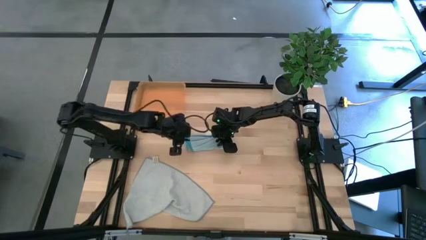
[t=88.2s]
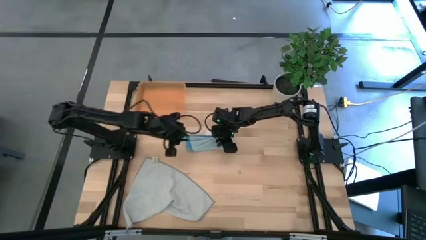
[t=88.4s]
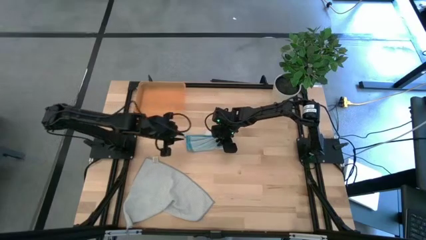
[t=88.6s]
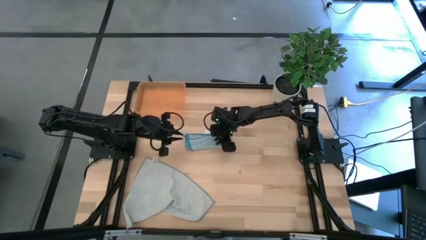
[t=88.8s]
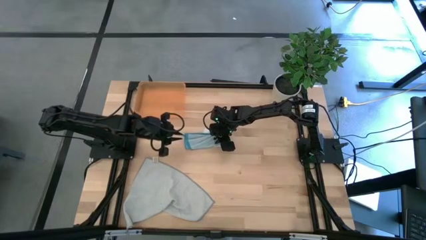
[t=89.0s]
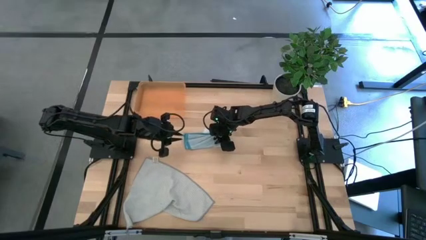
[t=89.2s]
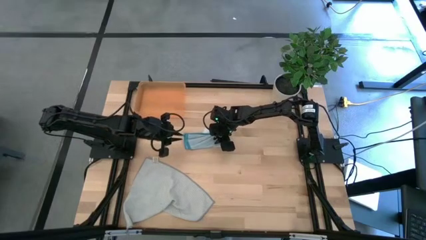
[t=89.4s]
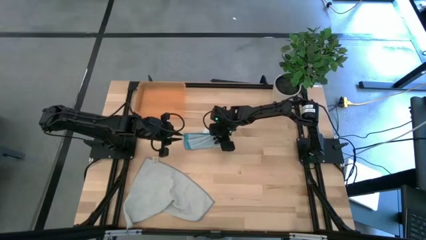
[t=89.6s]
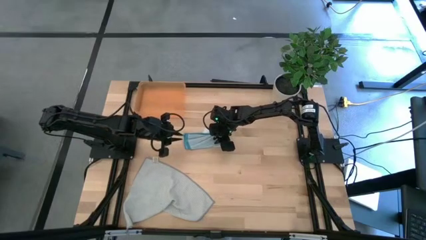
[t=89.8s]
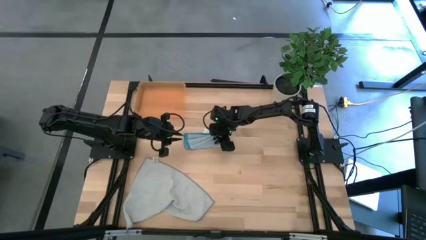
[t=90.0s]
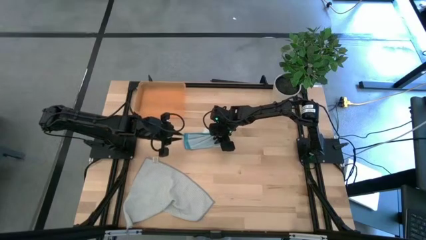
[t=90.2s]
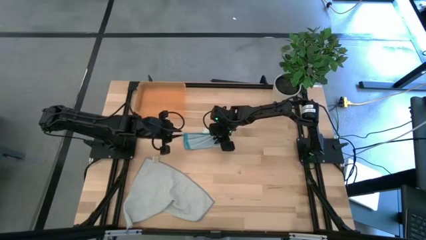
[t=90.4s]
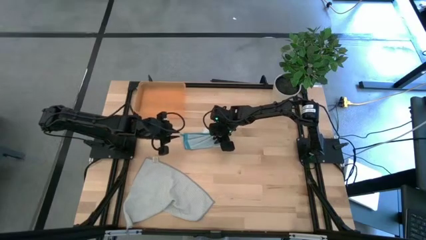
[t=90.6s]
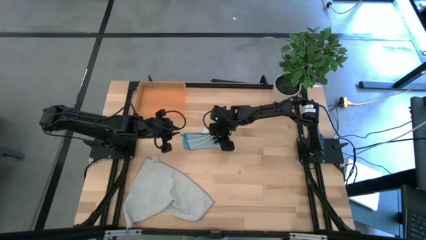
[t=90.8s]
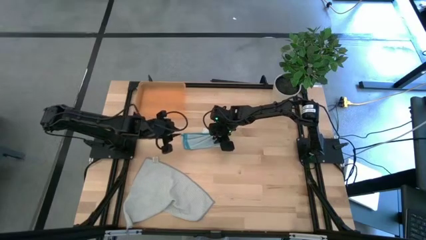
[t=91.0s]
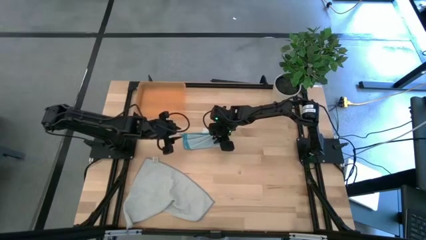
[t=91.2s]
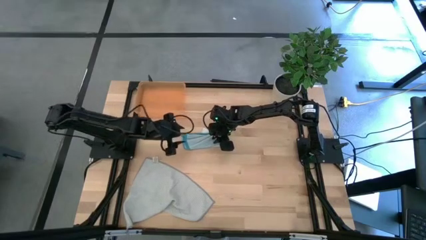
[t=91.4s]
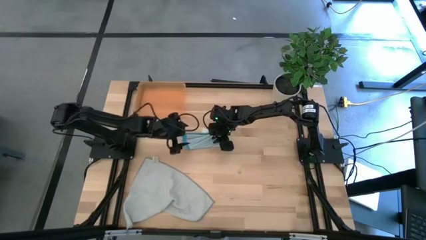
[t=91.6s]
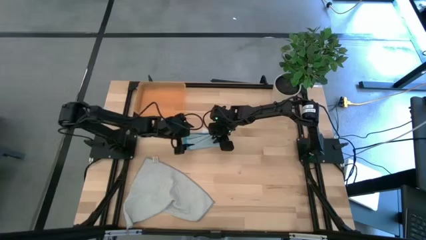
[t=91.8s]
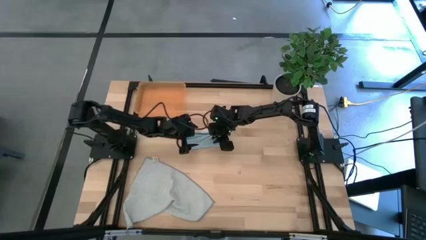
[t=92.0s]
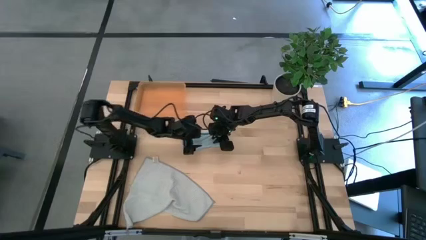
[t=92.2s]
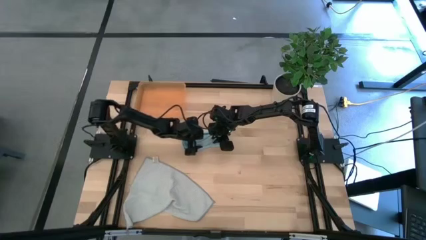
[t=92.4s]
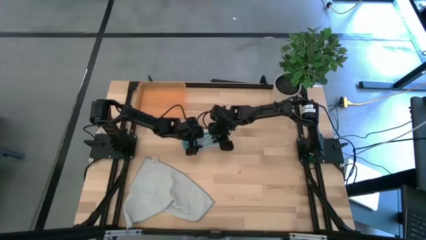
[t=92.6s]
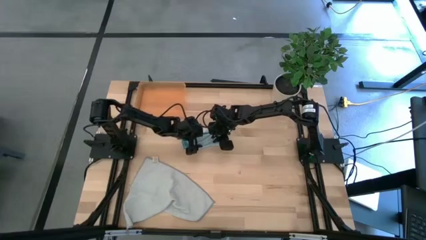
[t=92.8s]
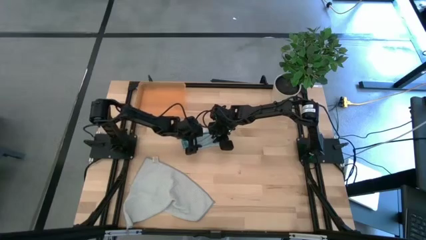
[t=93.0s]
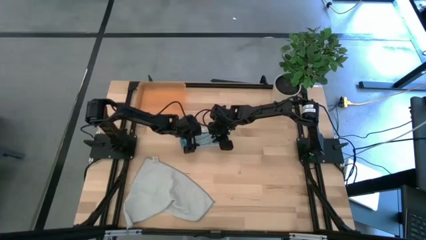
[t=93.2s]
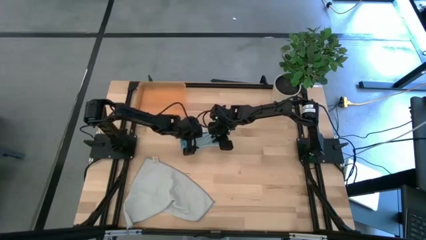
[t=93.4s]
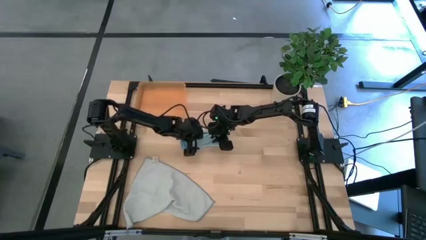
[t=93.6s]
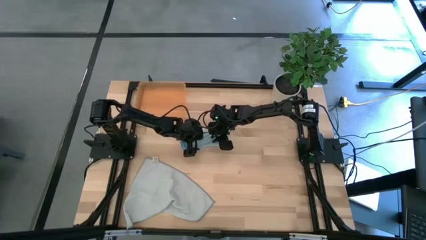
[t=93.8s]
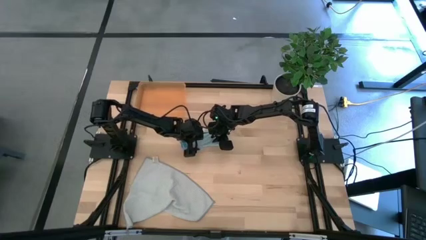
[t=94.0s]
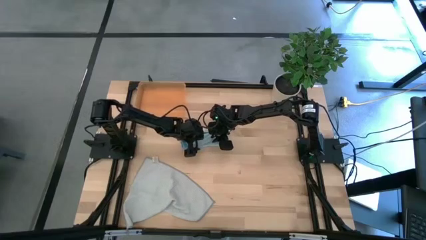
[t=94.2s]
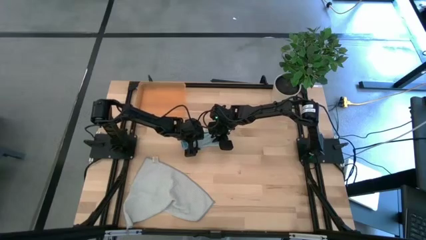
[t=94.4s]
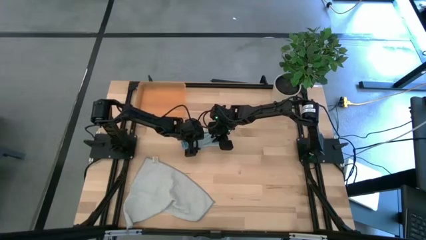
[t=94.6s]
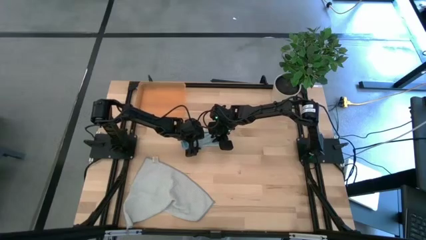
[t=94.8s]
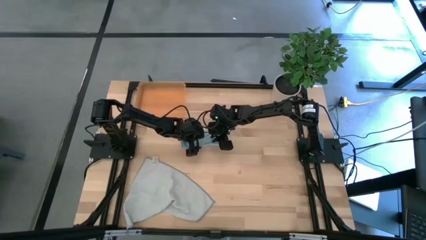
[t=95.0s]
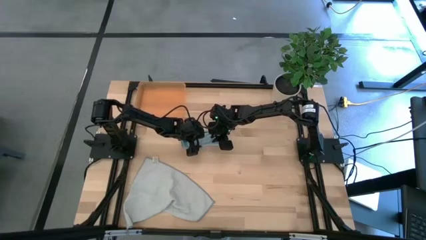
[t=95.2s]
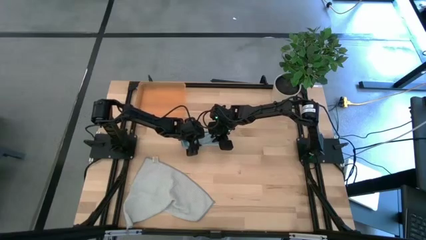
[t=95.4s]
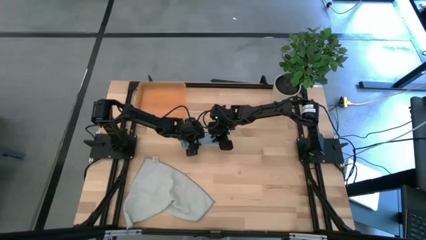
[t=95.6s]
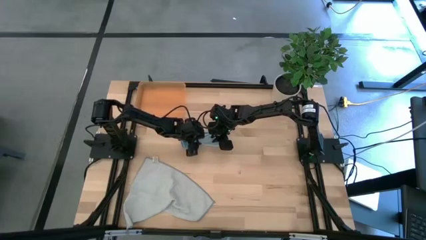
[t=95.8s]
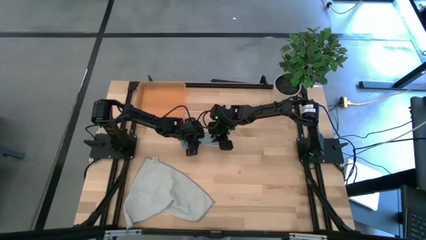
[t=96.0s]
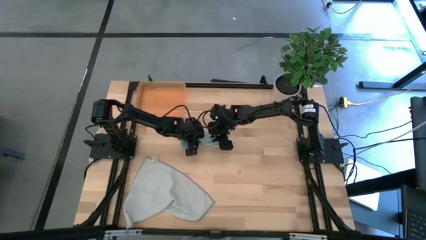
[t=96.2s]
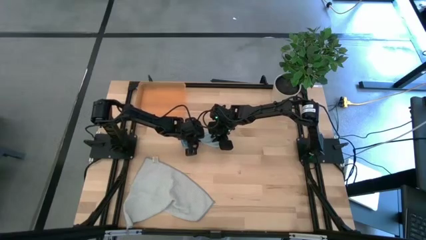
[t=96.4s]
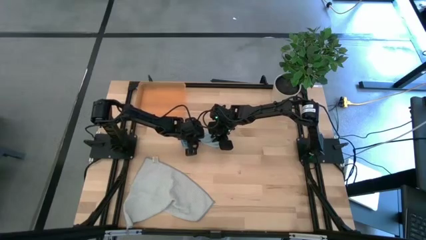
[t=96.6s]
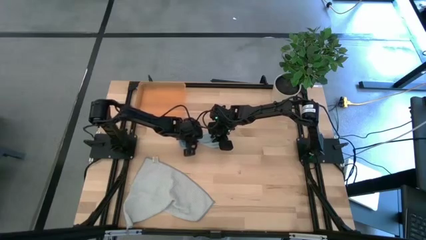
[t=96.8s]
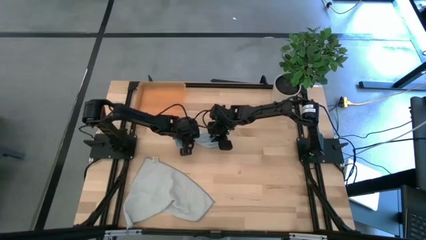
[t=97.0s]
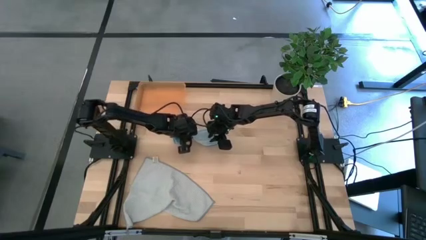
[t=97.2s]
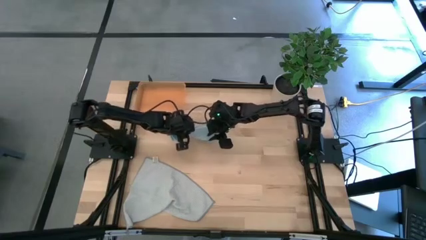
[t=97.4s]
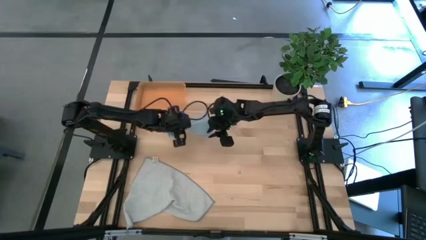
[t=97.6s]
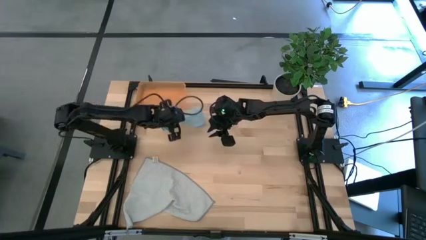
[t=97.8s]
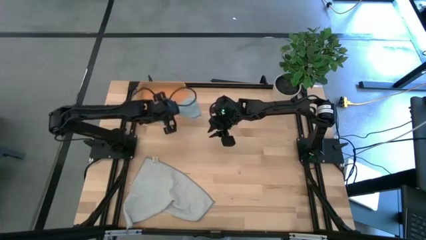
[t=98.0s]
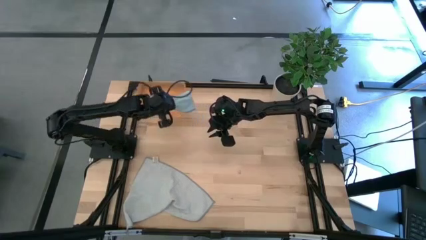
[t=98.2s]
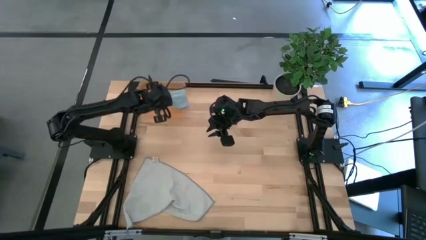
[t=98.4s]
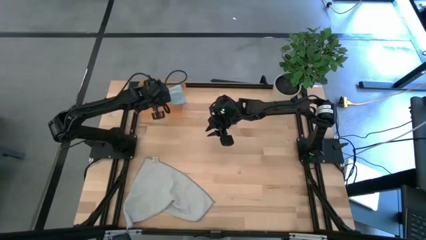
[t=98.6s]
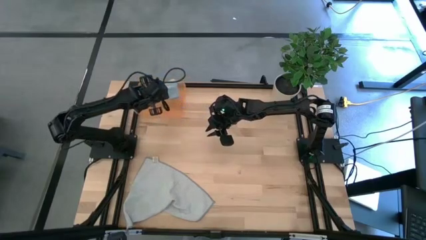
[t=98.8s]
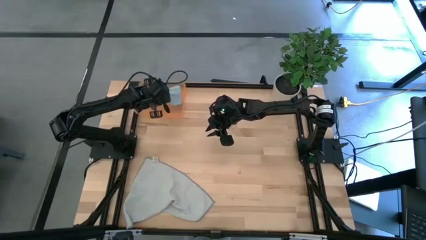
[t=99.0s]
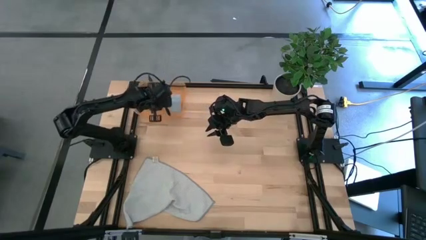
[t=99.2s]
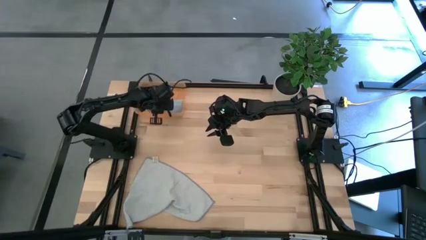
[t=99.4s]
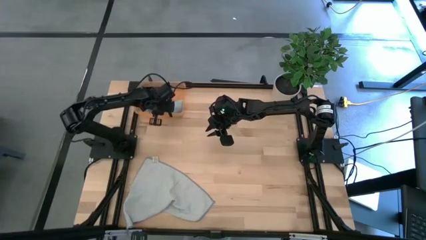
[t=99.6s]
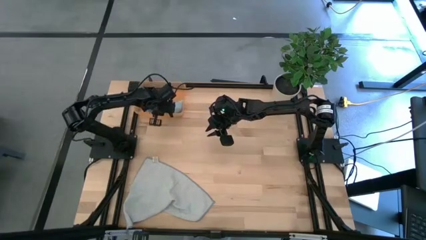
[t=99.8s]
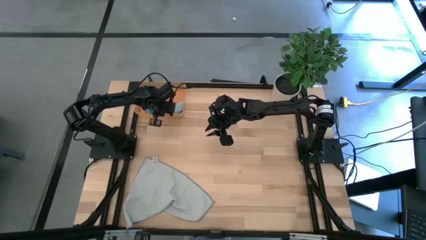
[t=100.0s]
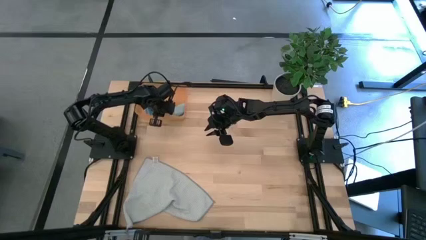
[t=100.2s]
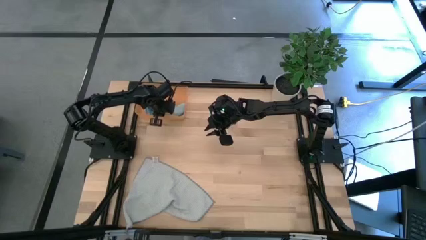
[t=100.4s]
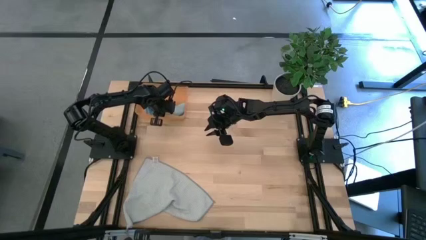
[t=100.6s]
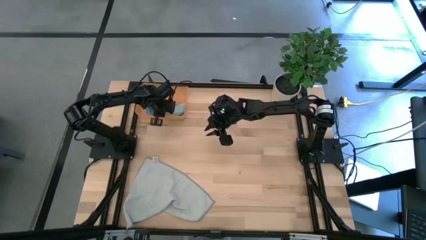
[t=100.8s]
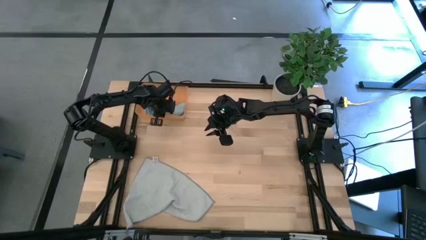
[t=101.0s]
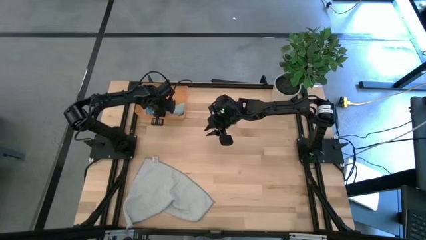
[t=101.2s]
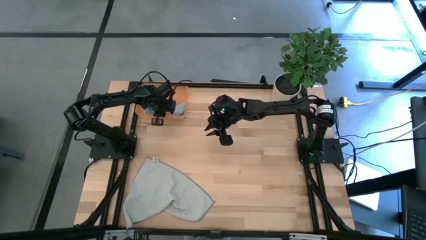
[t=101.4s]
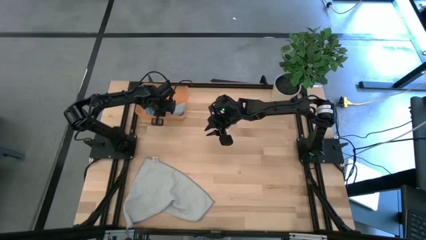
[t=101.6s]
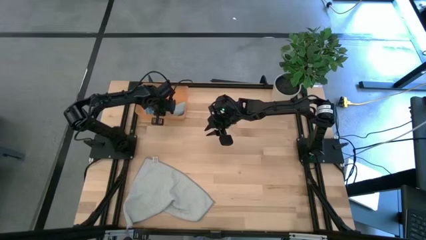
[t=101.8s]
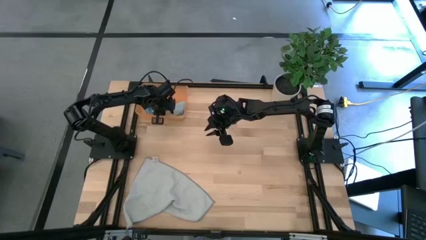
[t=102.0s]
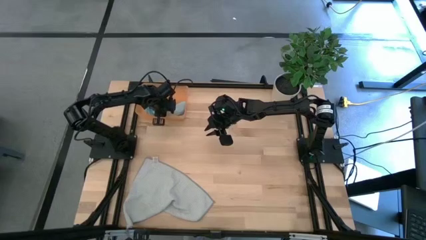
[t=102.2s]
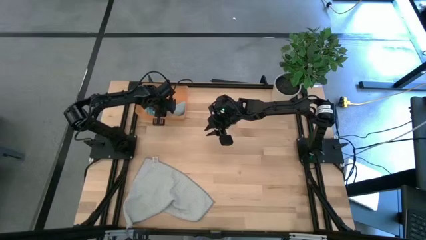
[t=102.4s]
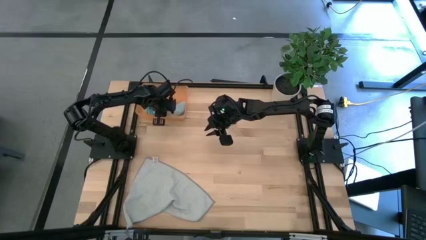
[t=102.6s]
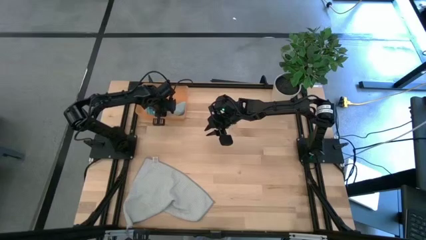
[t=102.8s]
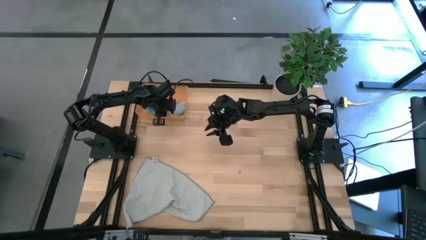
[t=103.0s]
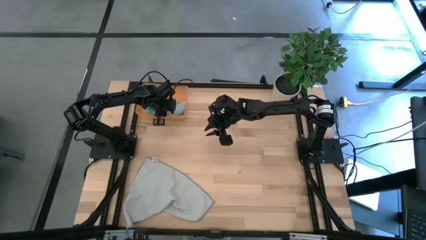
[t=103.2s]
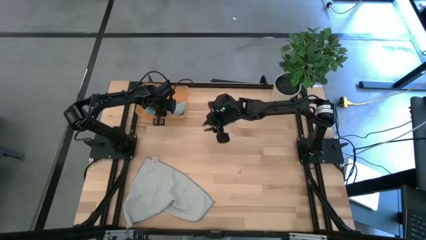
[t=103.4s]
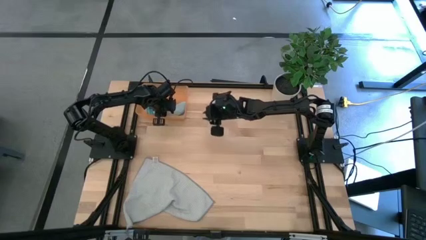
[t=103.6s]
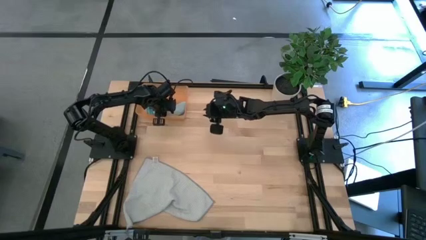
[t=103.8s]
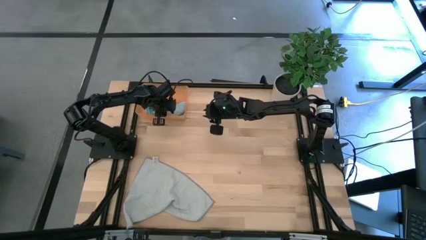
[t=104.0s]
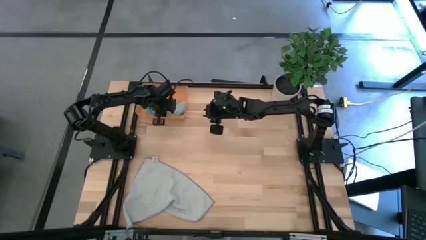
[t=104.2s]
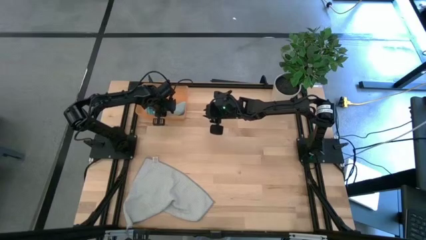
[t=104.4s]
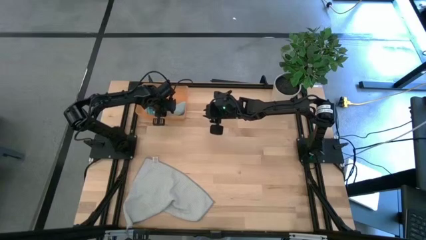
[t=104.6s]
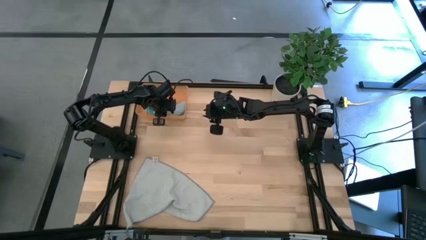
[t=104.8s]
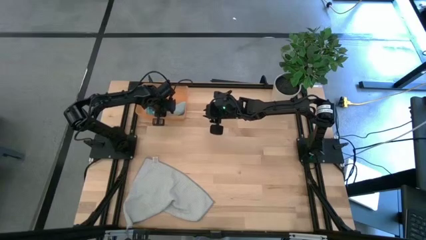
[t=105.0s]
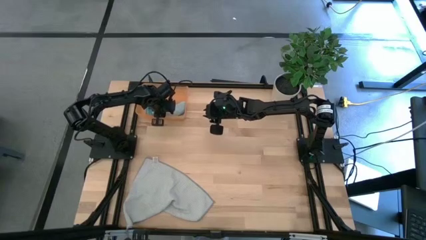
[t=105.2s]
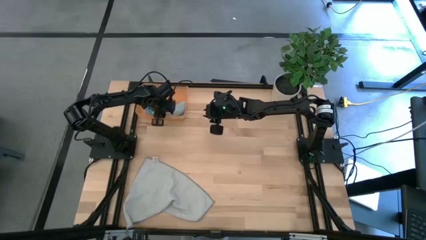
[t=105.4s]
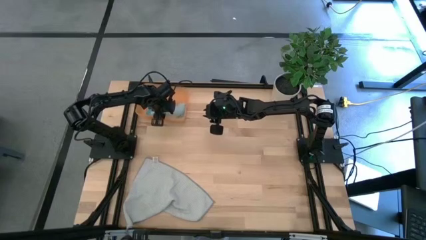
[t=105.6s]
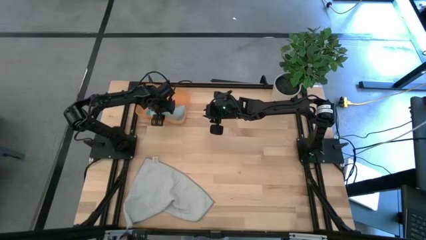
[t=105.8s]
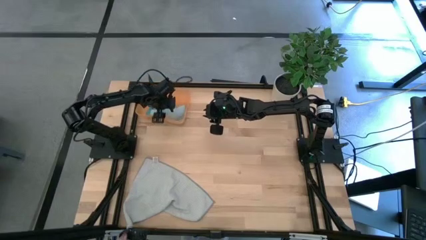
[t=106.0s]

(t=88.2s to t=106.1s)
Task: Roll microfiber towels into tight, uniform cylinder then place into a basket
Put the blue microfiber cloth into the bin
